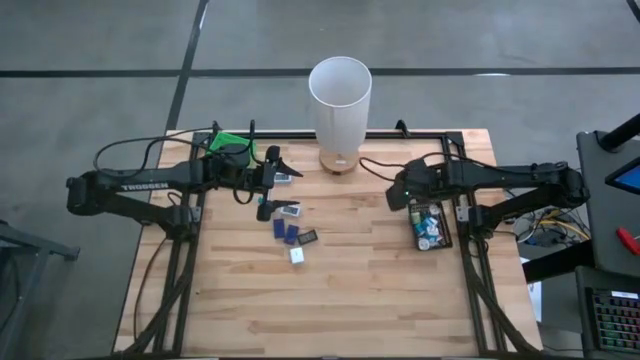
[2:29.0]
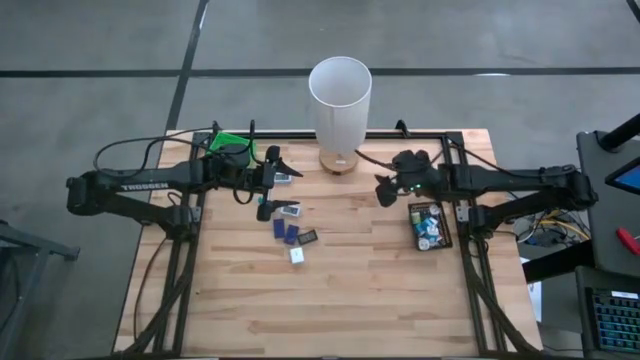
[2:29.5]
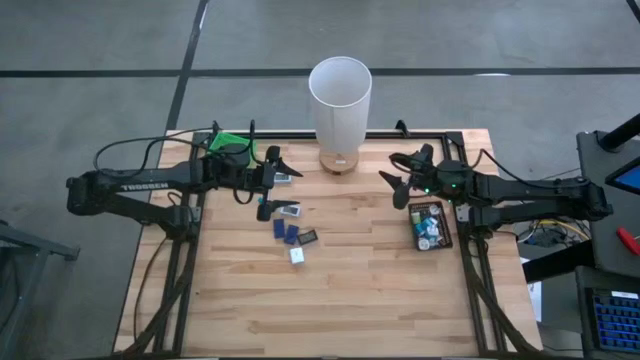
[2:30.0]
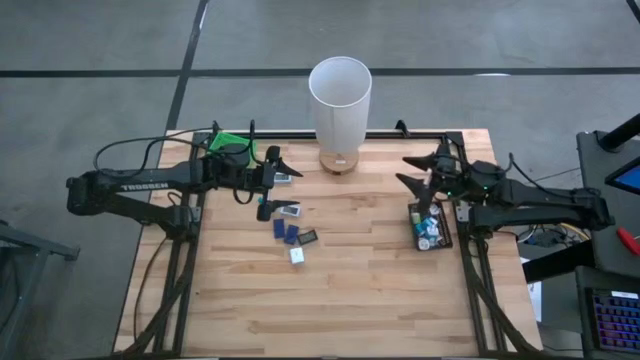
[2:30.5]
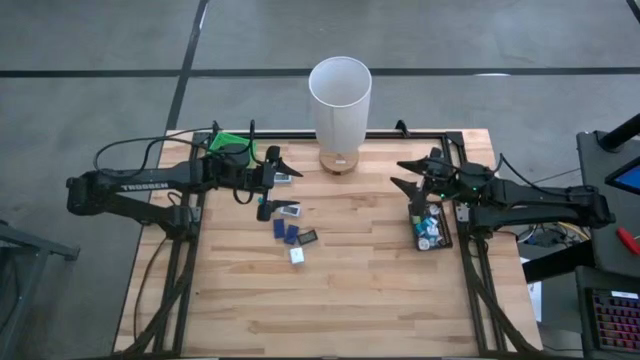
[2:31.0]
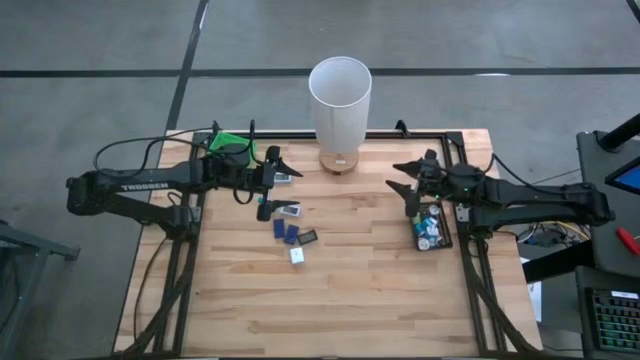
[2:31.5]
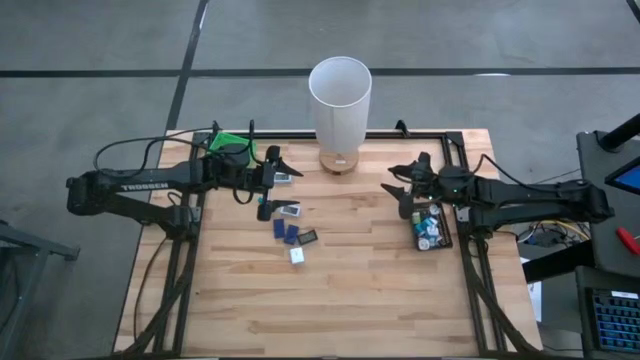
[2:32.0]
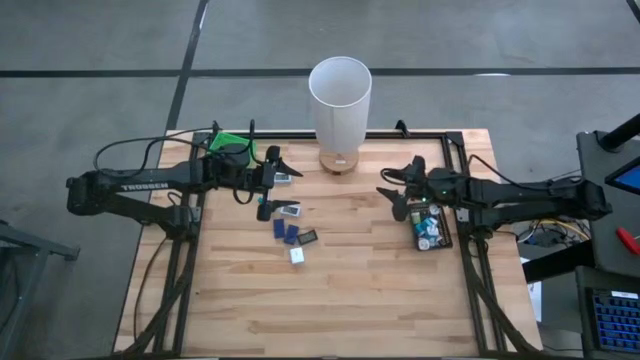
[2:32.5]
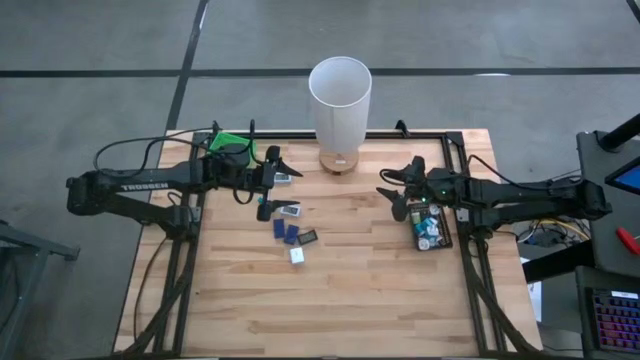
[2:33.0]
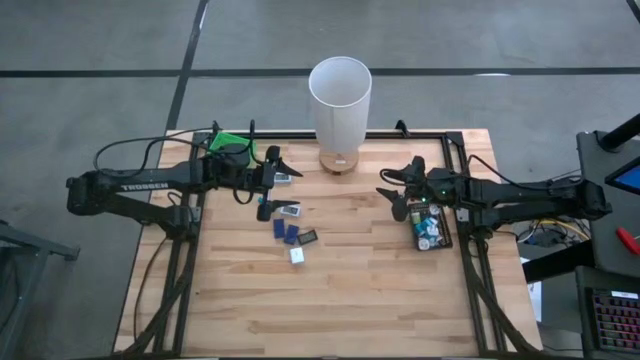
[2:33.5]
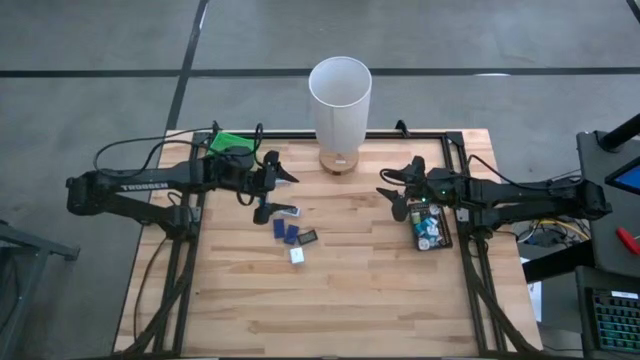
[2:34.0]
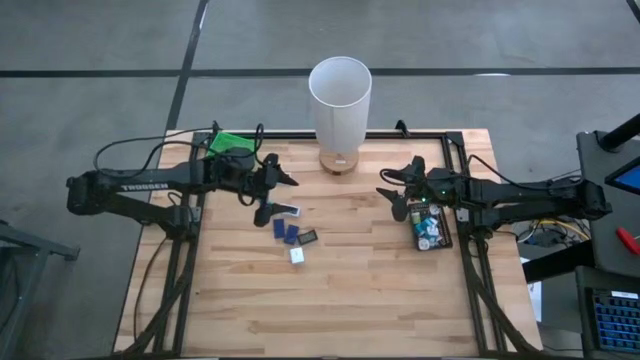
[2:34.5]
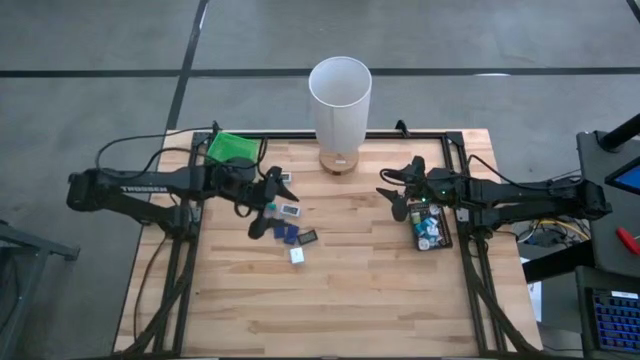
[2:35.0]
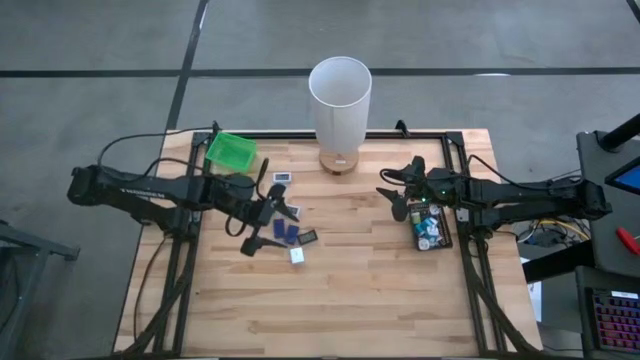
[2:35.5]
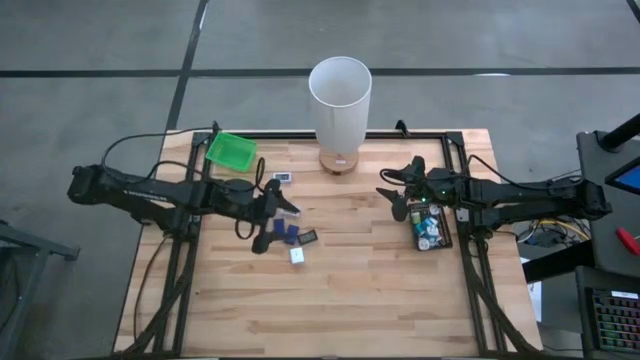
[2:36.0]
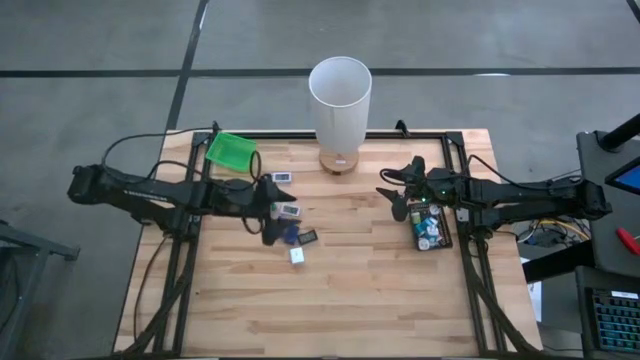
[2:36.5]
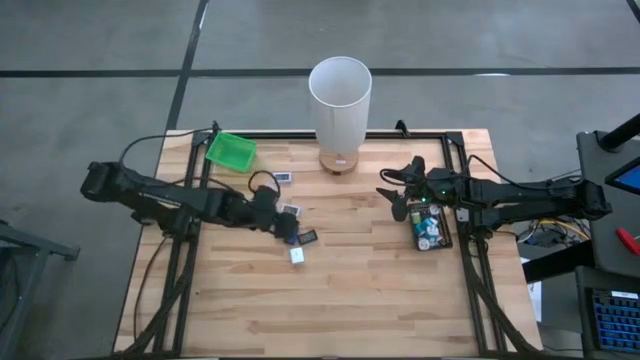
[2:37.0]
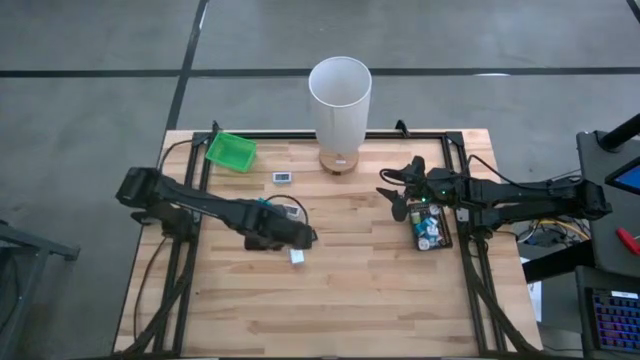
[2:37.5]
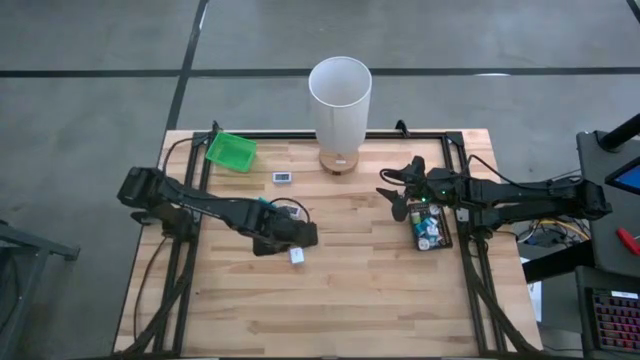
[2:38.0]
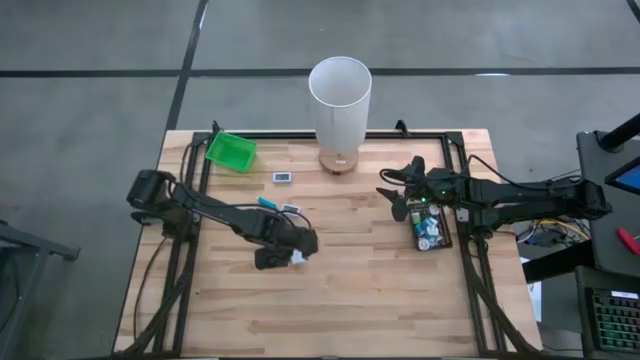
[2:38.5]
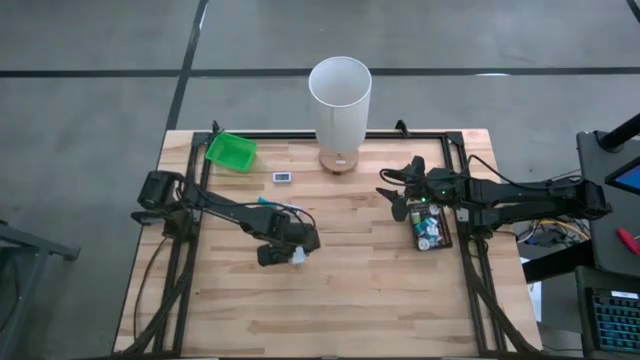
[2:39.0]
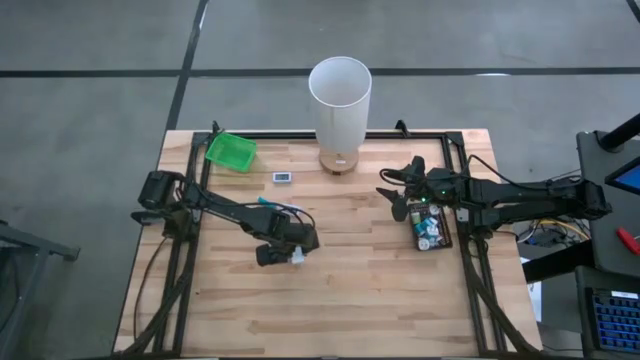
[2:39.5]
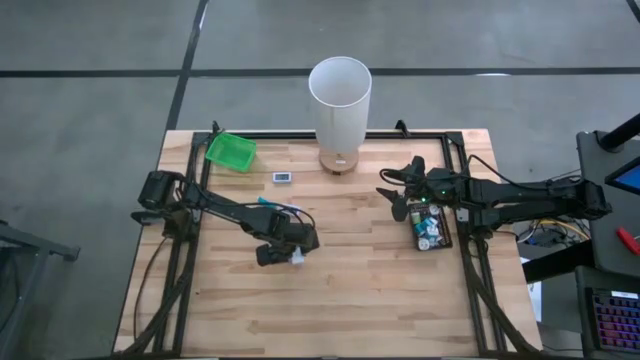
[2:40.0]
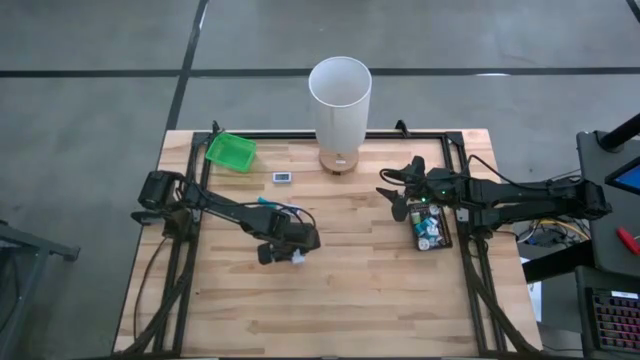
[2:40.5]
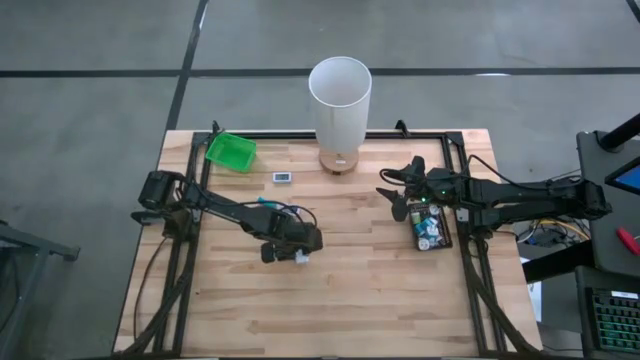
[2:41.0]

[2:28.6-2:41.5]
Task: Pick & Place Office items
Put the white charger adapter into the black bin

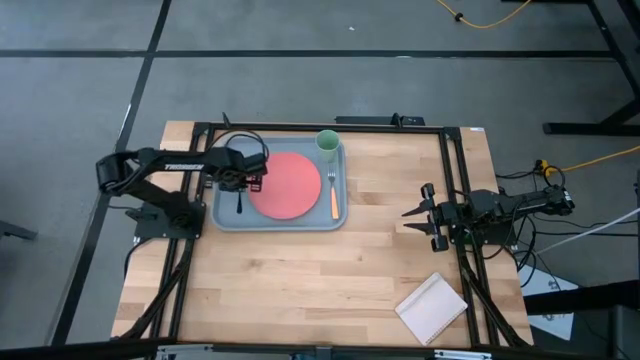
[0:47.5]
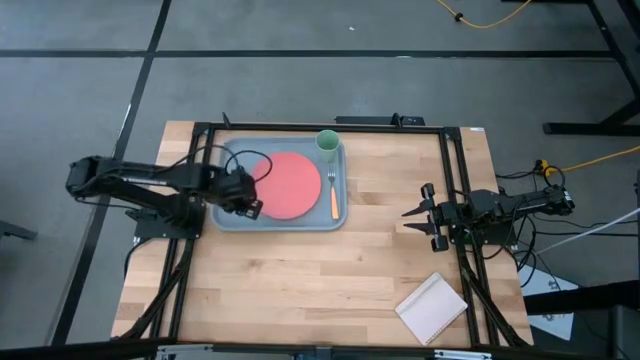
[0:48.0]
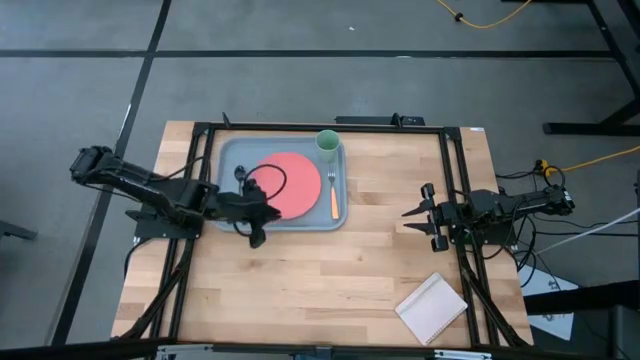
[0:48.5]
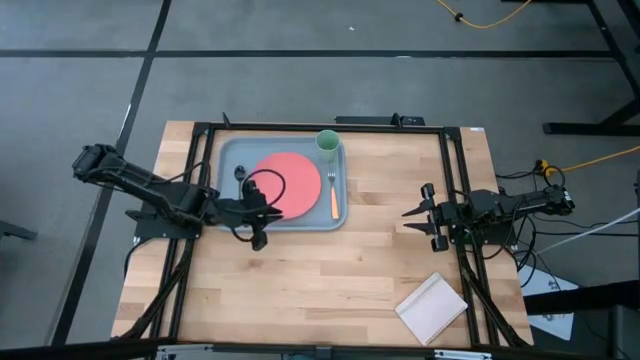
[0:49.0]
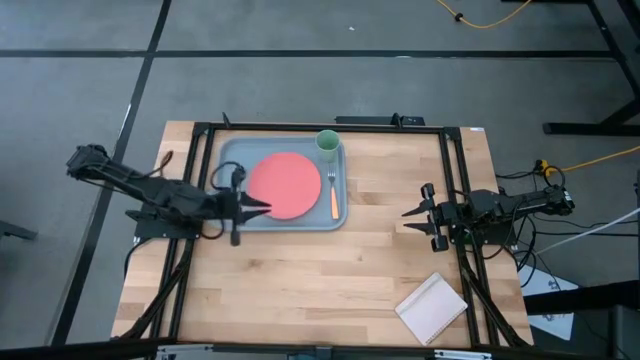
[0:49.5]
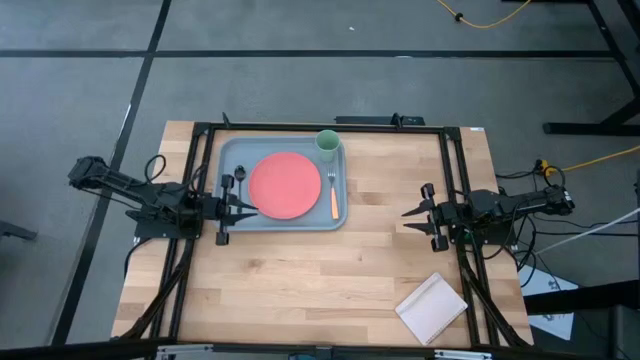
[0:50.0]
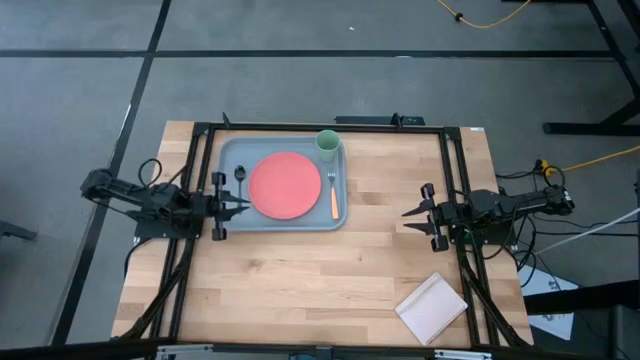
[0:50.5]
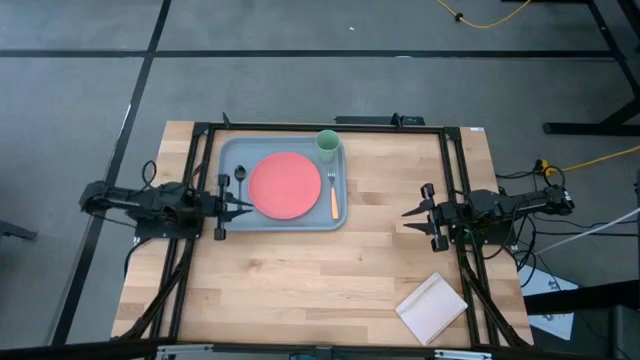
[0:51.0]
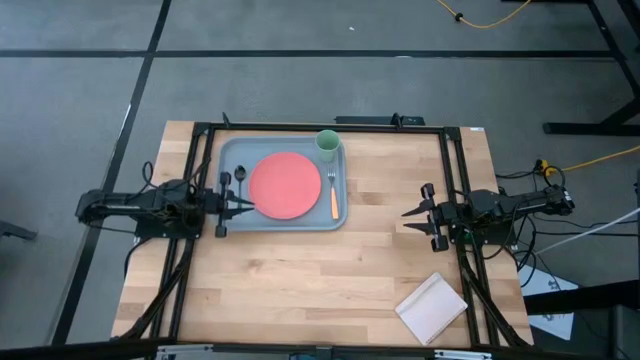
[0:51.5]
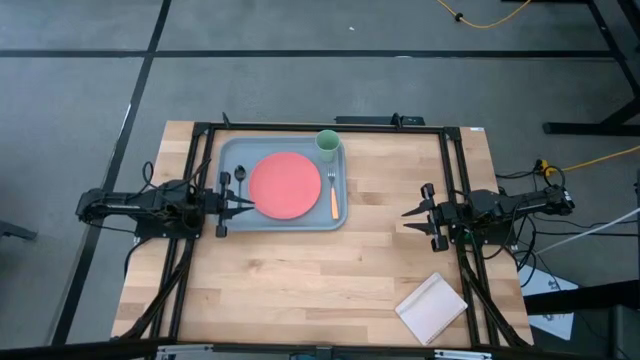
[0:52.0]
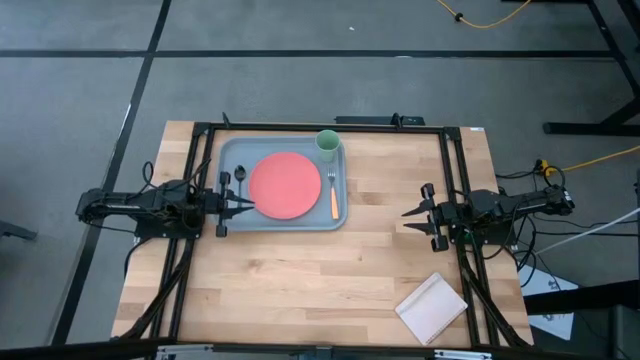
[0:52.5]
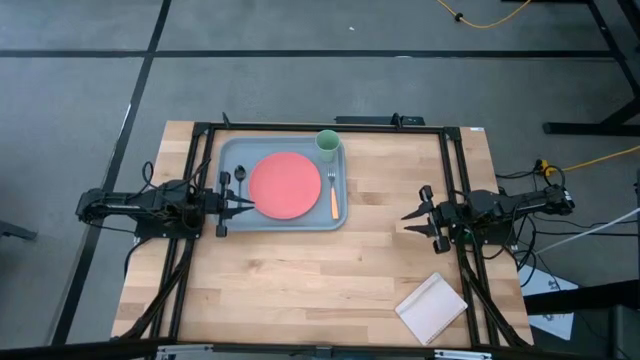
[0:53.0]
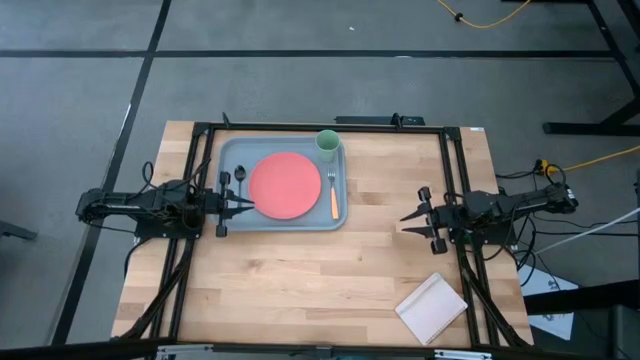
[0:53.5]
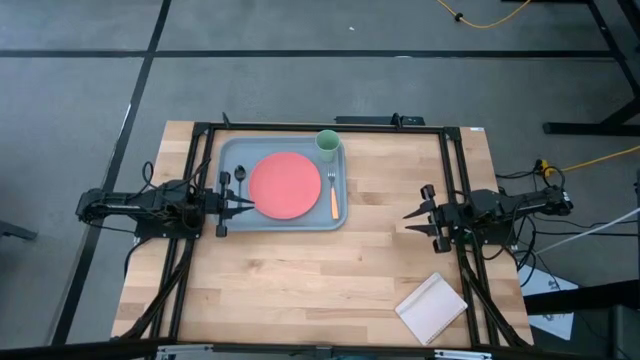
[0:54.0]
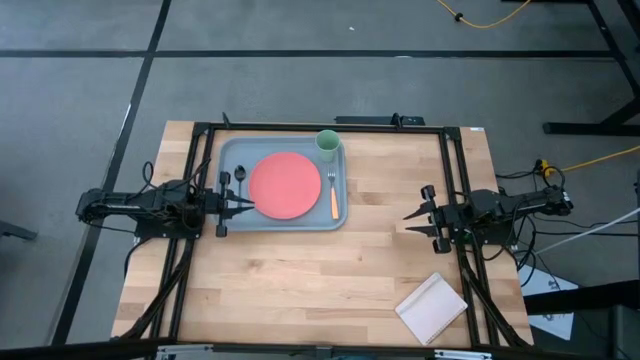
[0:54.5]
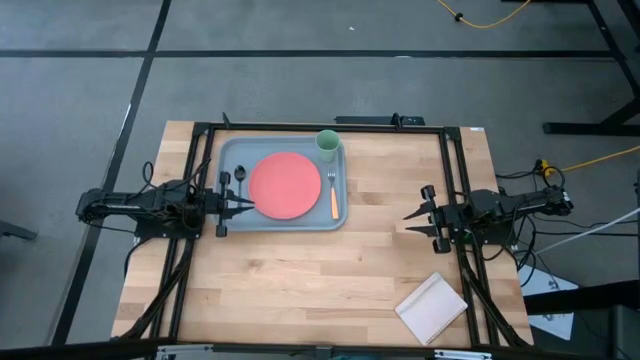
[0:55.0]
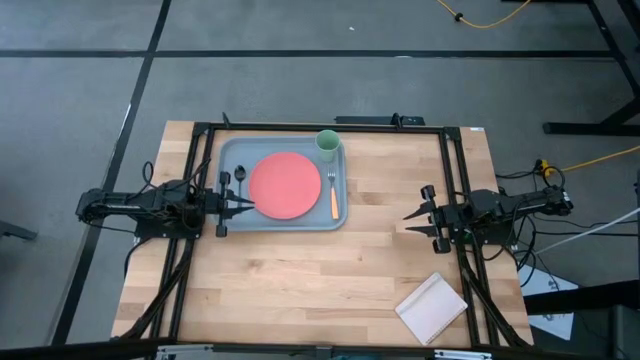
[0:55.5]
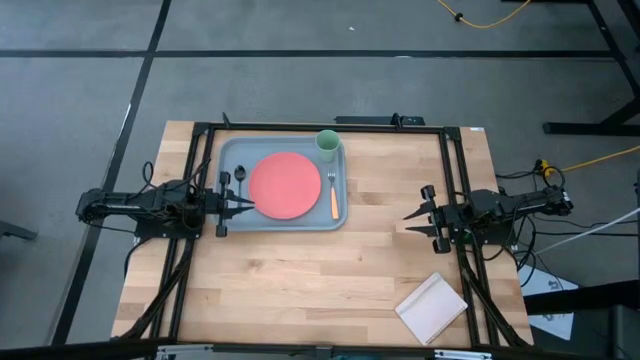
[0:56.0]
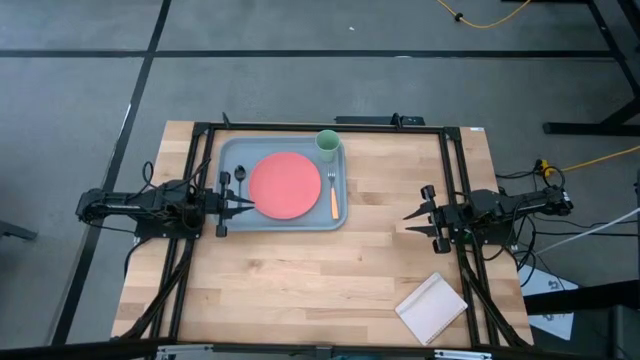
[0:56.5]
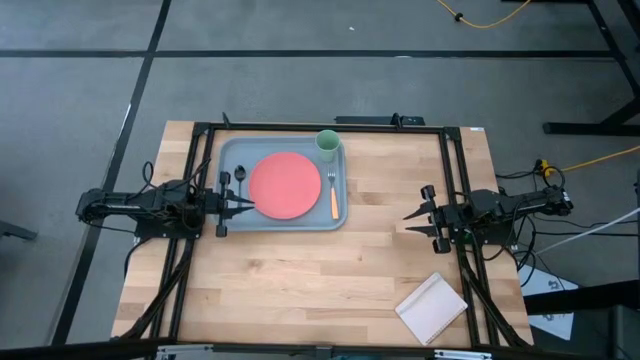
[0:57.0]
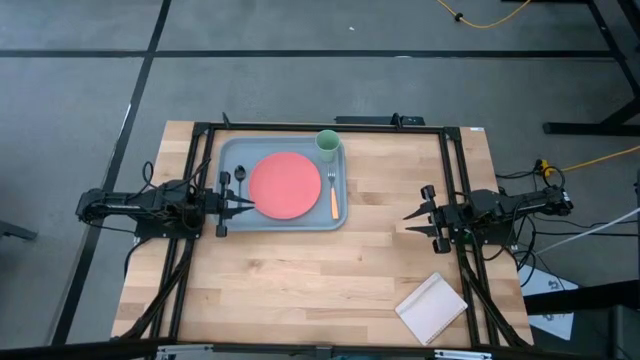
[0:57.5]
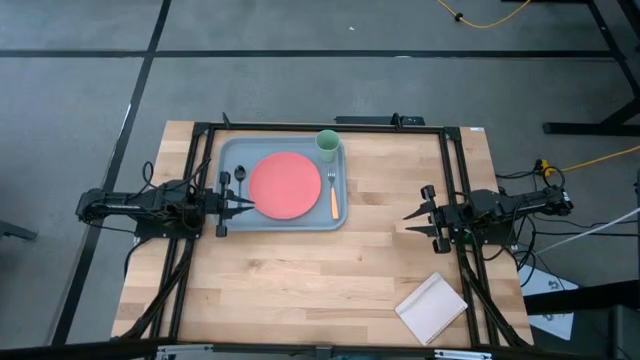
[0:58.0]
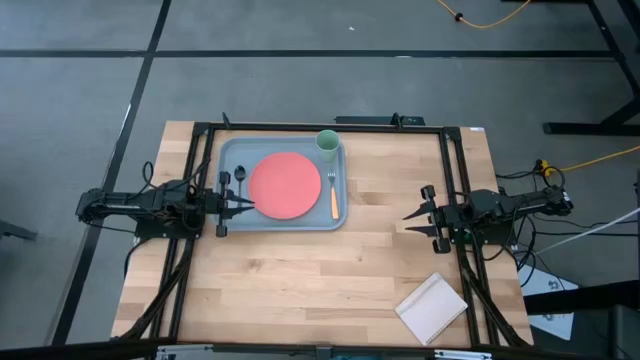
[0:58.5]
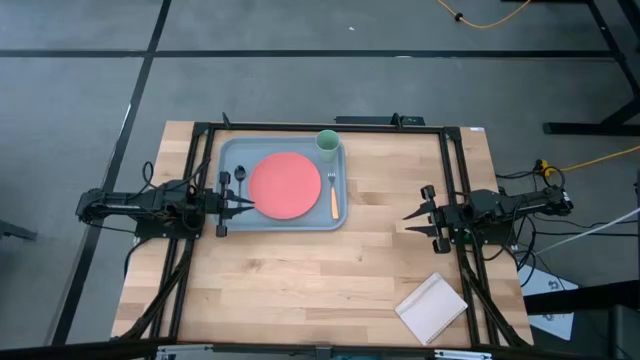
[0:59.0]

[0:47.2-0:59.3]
Task: Pick and place plate/cup/fork/spoon on tray
Return to Home Position
